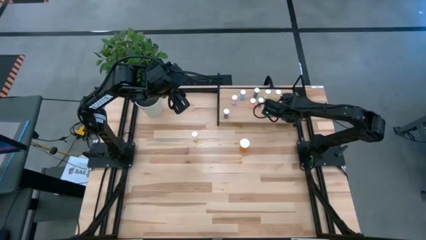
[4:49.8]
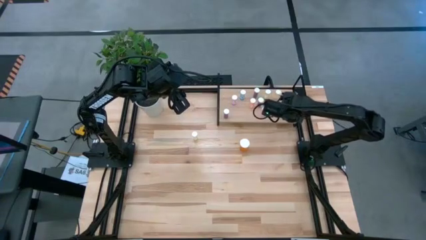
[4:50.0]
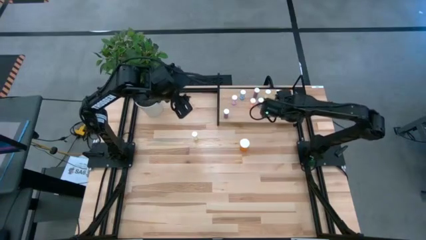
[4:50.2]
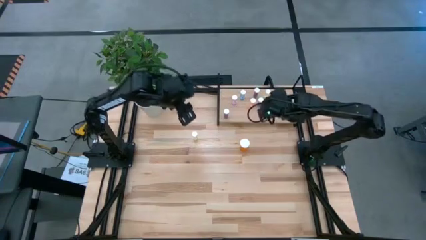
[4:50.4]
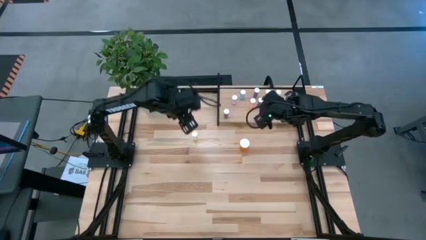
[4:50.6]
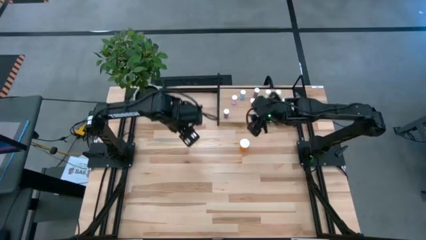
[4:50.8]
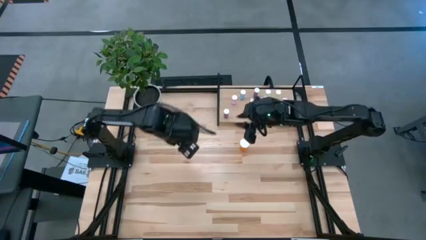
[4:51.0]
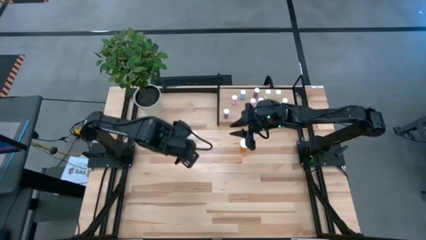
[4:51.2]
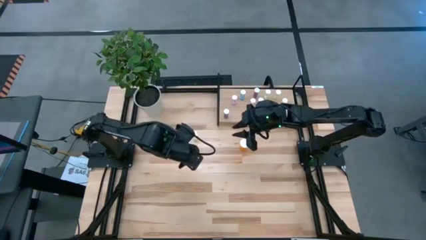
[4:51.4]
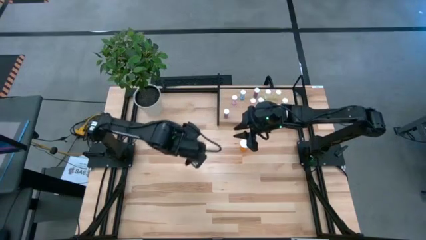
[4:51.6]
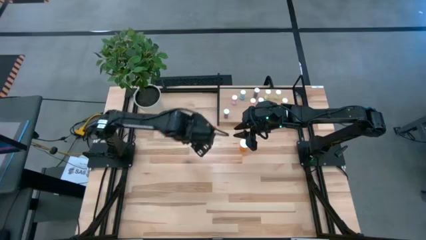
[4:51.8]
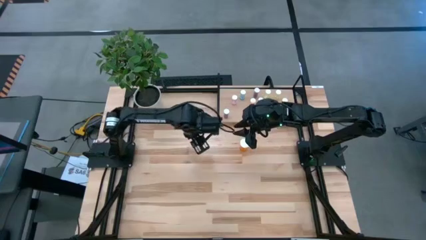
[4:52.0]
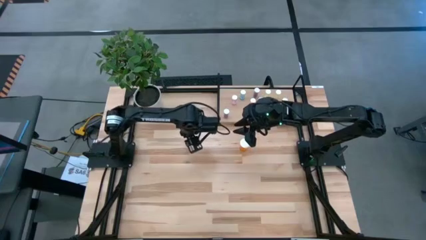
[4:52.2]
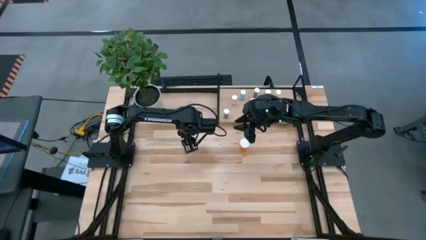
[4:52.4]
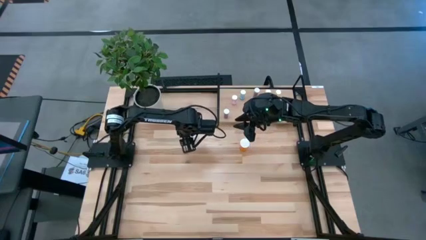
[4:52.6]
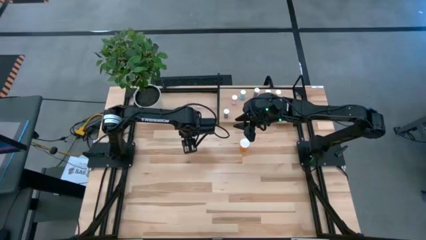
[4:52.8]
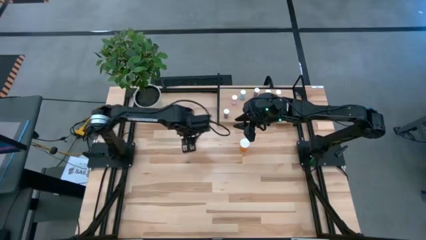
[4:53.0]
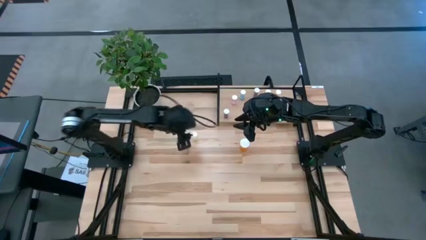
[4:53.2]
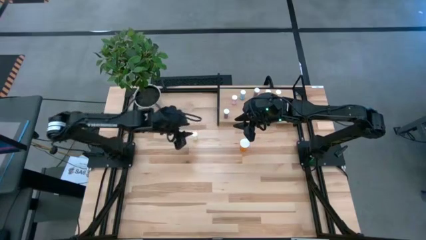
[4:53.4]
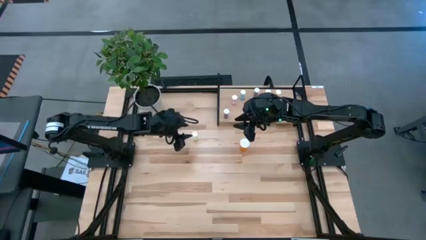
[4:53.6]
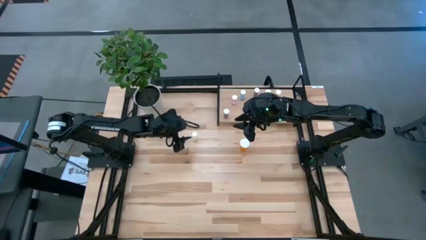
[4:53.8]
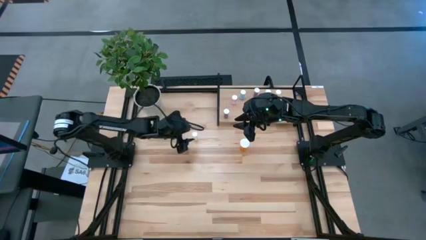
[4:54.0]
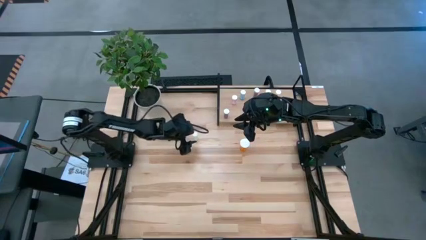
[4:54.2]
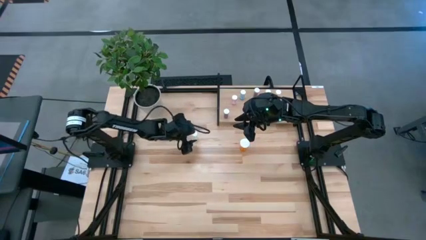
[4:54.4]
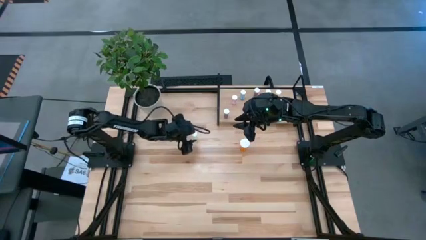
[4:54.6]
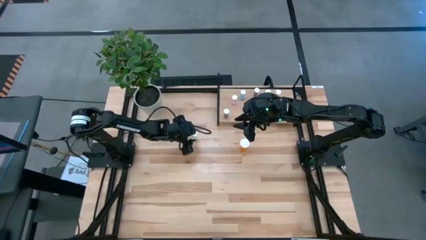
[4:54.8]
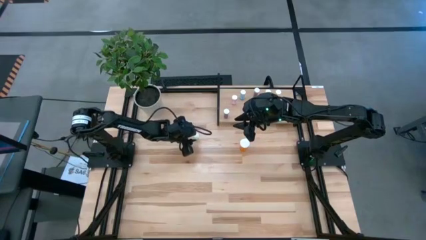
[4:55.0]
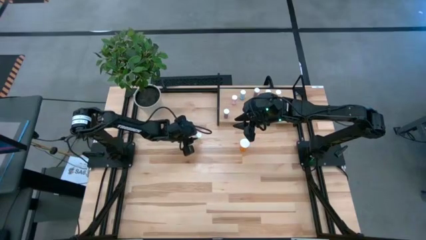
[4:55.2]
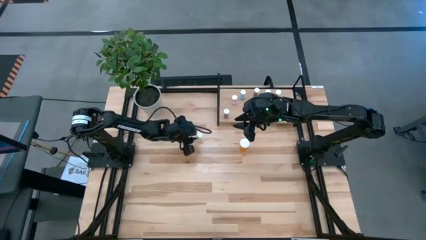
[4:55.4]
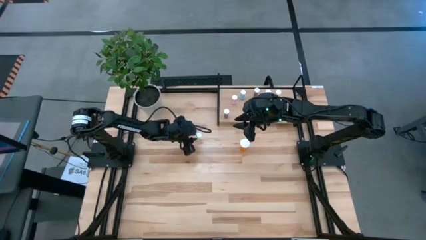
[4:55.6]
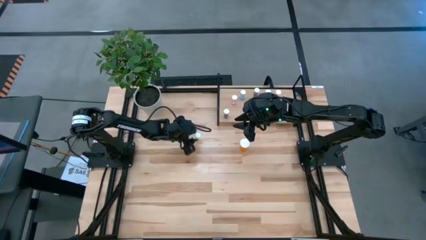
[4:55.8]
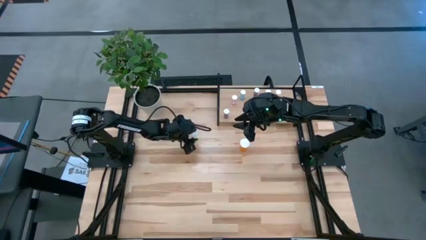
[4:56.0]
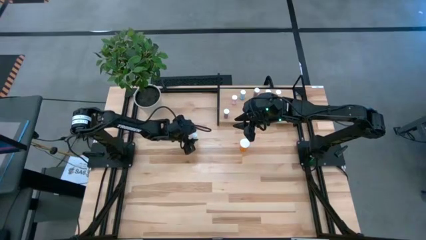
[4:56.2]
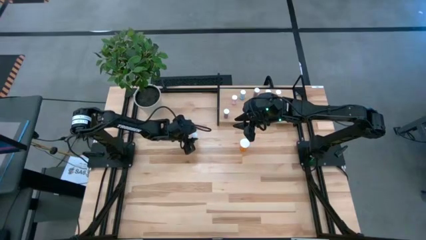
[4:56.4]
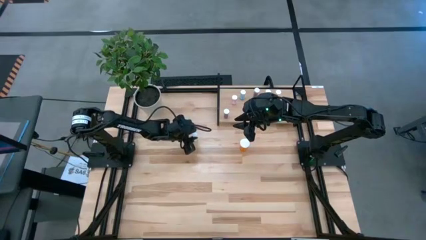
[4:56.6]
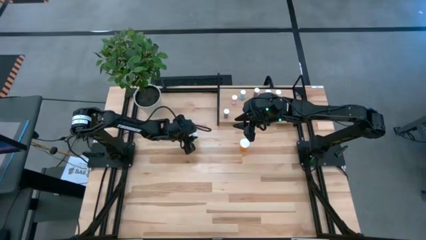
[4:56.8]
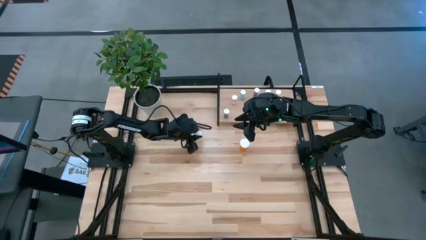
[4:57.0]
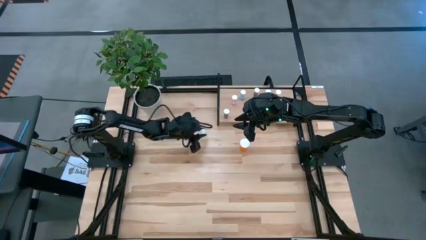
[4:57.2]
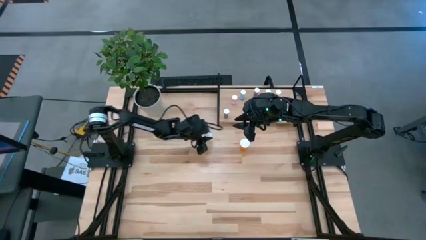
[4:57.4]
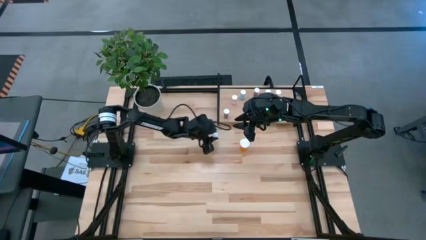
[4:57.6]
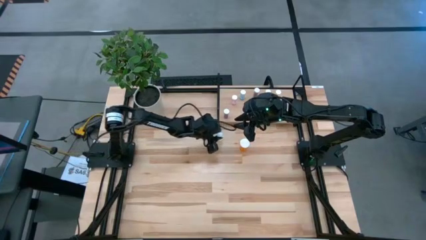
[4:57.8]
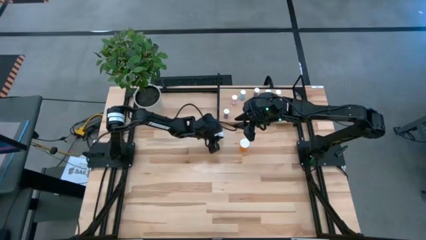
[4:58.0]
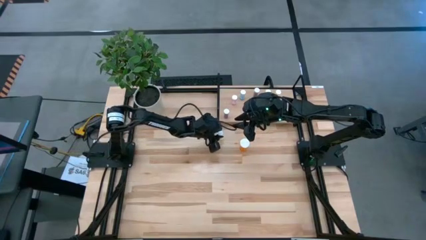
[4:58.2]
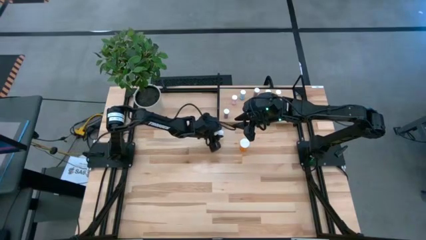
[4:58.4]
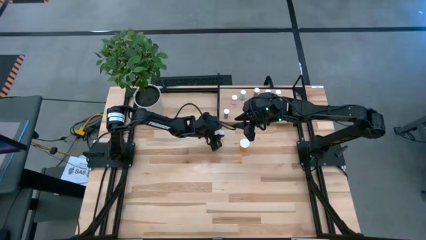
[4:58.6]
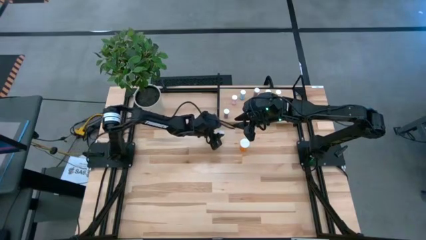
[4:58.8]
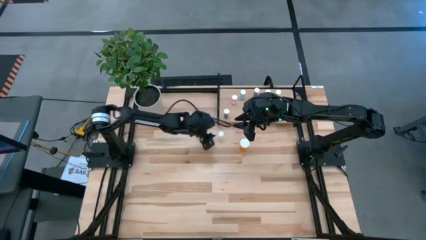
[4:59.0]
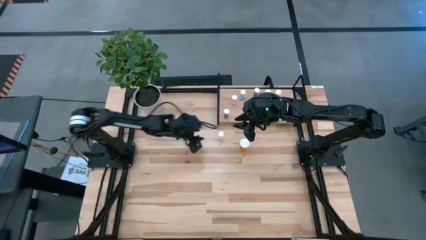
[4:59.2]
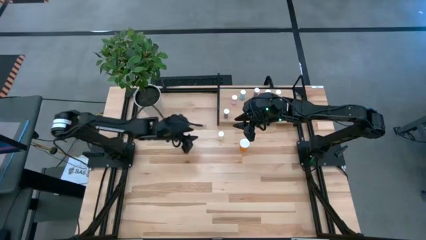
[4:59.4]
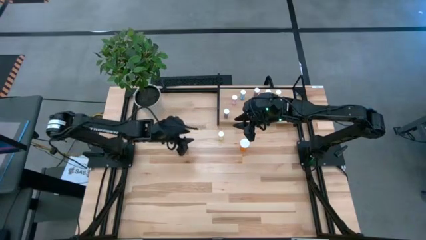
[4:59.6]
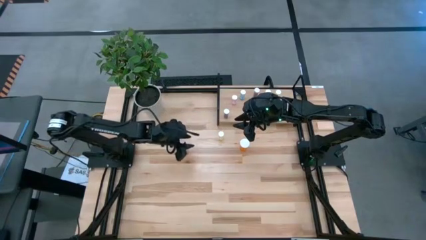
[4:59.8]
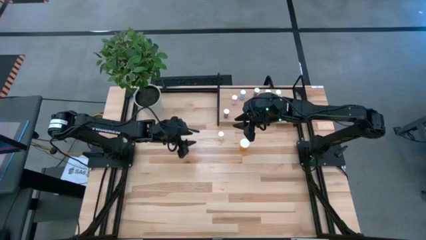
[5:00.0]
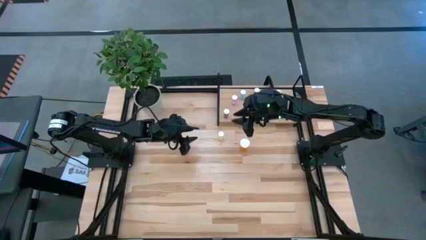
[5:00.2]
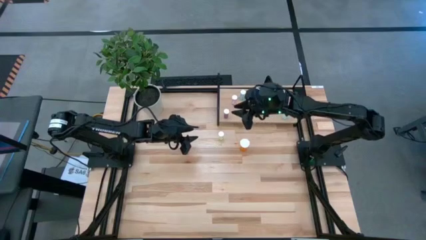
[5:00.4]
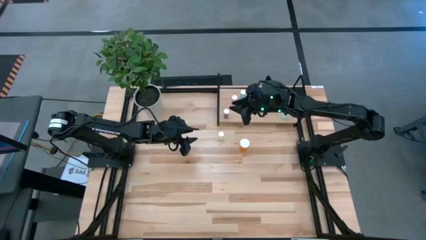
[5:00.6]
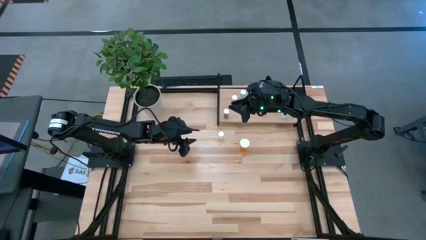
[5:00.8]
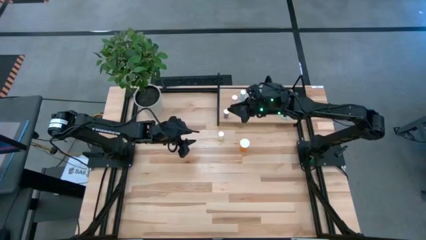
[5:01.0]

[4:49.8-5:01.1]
Task: Pick and place medicine bottles onto shelf by color
Put the yellow pill bottle on the shelf

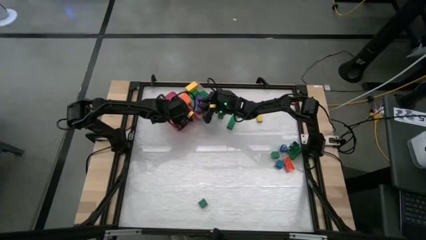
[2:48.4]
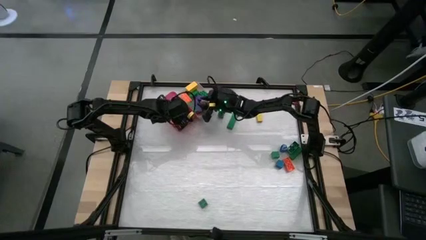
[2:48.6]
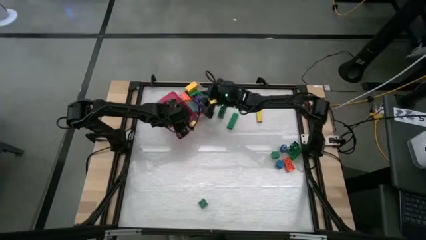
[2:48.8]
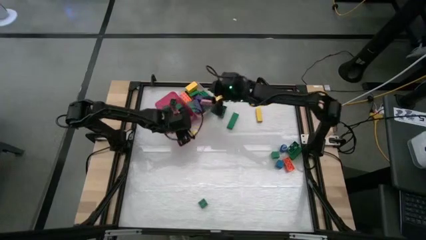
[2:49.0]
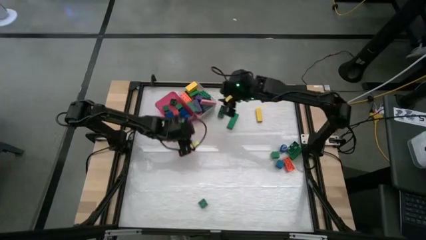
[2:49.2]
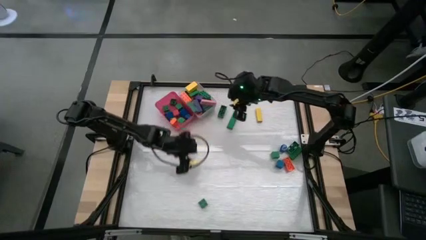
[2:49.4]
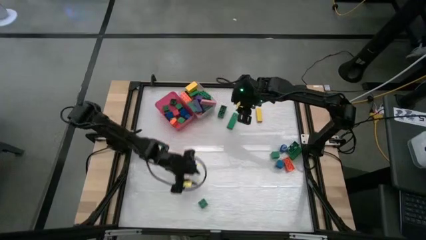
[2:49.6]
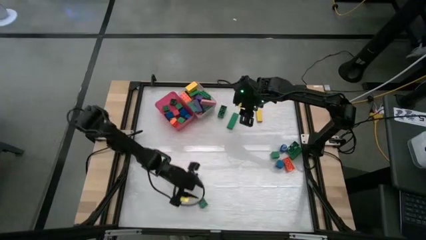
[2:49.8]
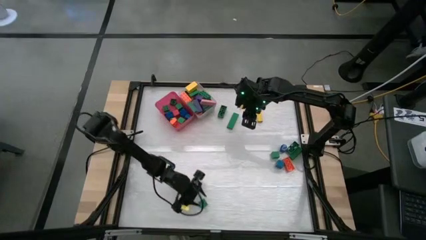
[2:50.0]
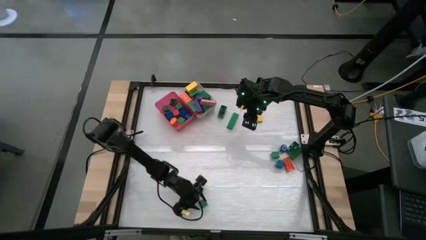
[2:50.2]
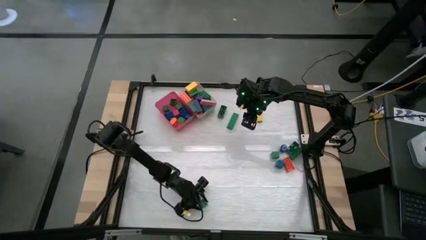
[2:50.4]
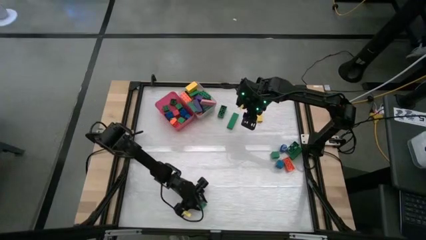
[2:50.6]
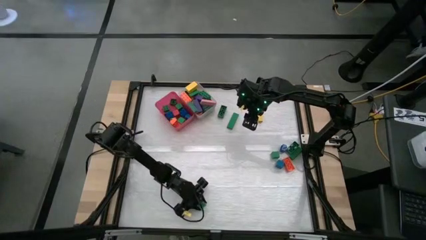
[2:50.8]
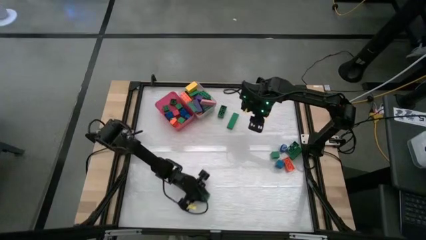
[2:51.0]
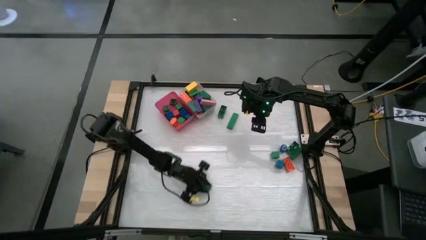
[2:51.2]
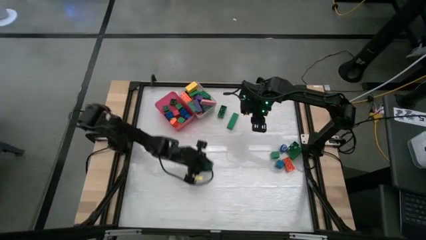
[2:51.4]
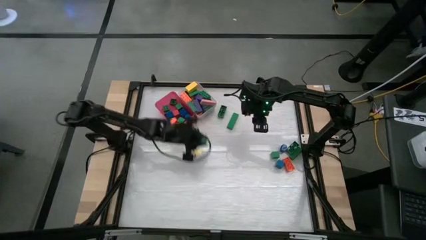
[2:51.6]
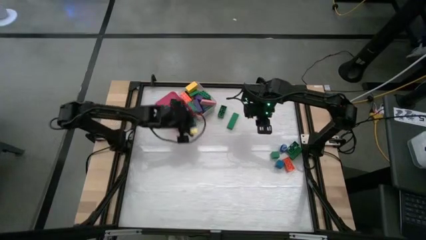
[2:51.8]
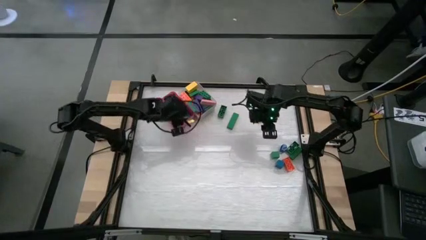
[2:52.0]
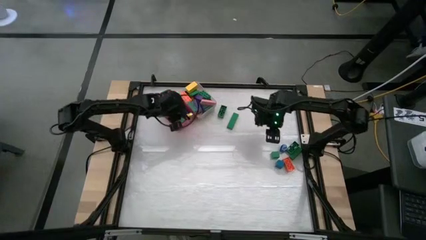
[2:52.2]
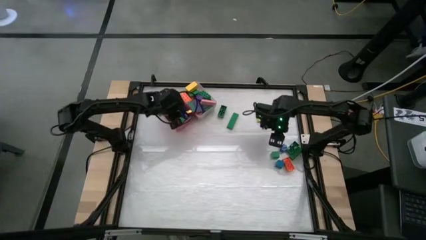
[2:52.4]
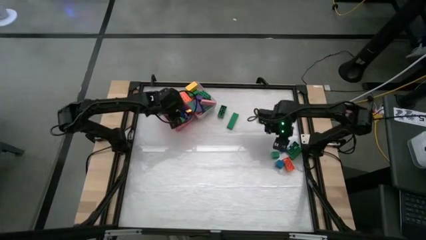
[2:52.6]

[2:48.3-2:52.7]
Task: Sort blocks by size
Put the small green game piece into the pink bin
